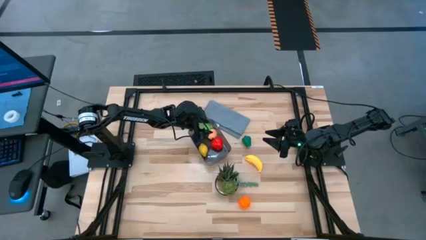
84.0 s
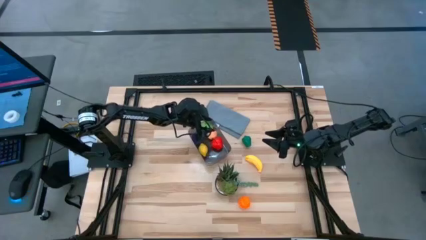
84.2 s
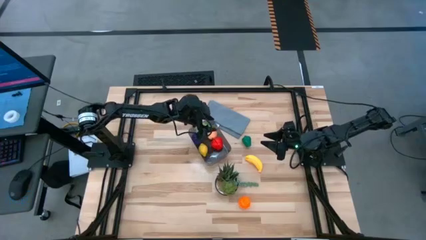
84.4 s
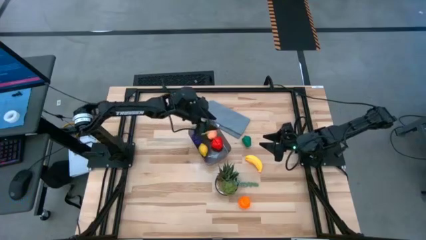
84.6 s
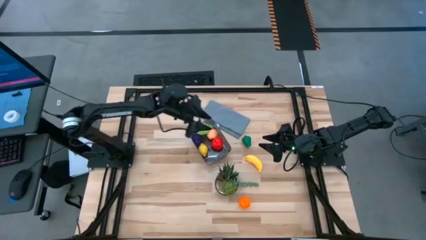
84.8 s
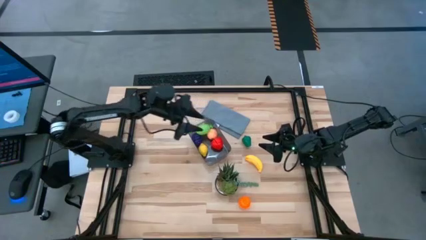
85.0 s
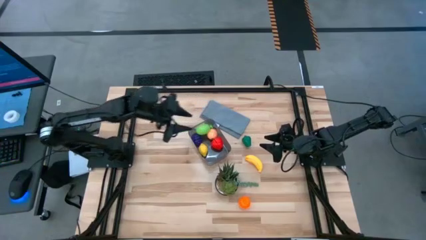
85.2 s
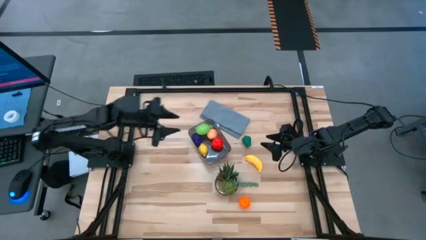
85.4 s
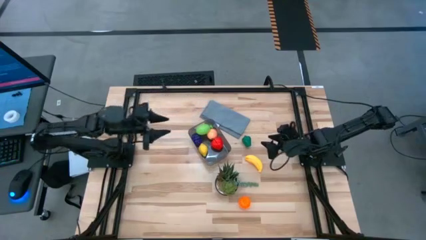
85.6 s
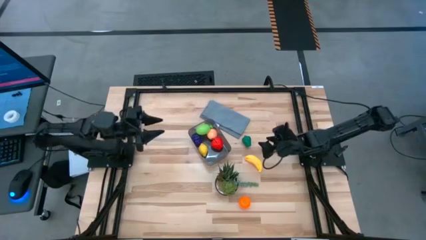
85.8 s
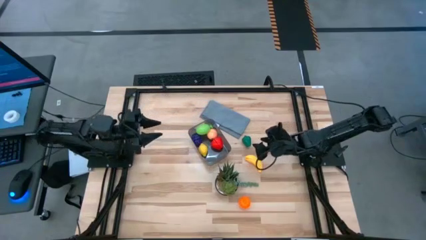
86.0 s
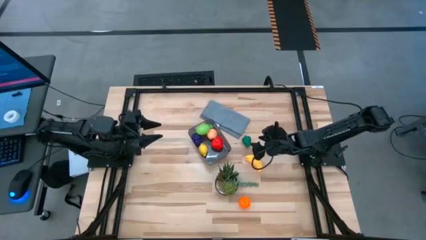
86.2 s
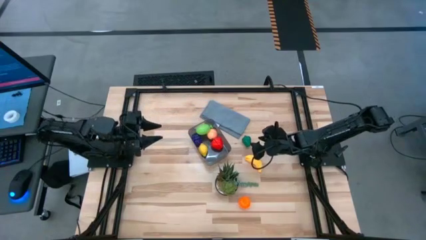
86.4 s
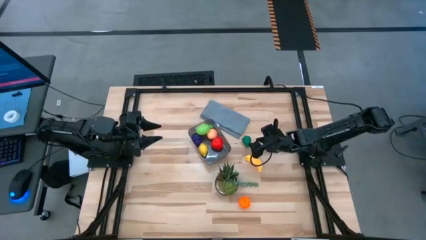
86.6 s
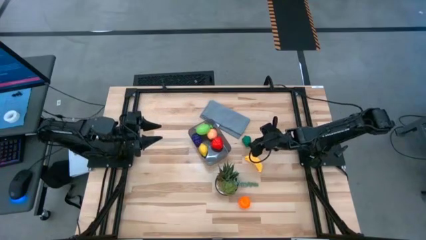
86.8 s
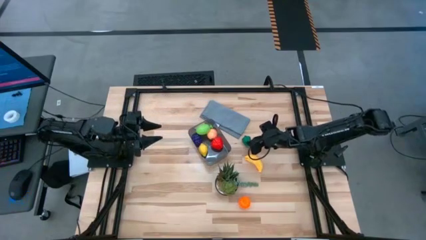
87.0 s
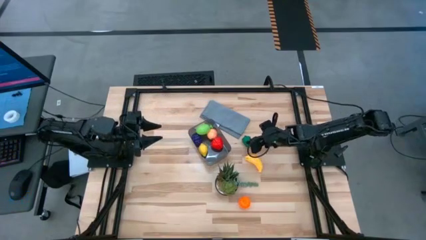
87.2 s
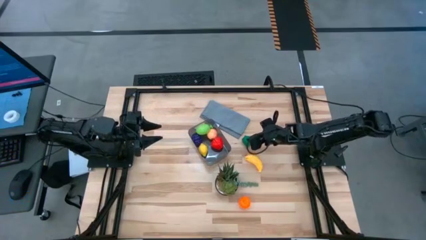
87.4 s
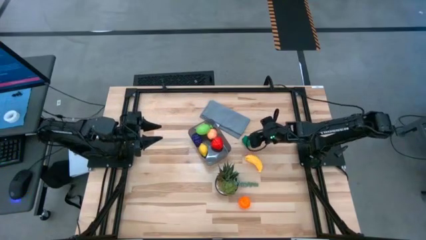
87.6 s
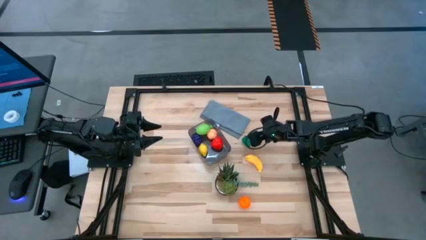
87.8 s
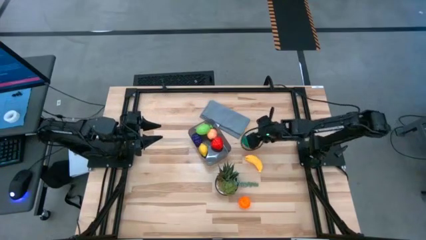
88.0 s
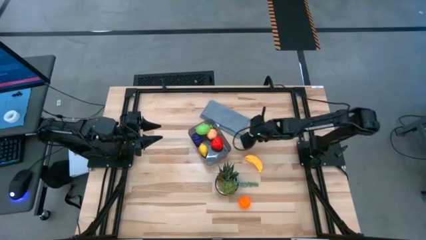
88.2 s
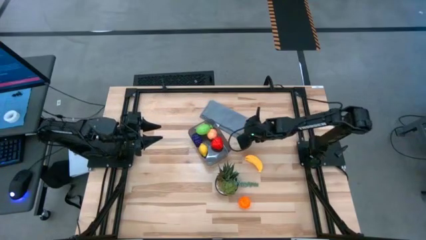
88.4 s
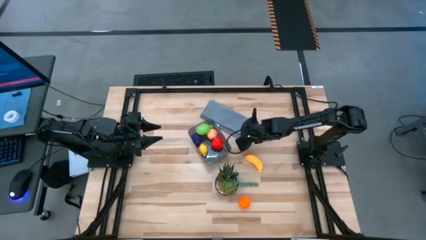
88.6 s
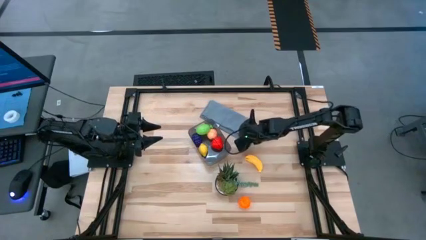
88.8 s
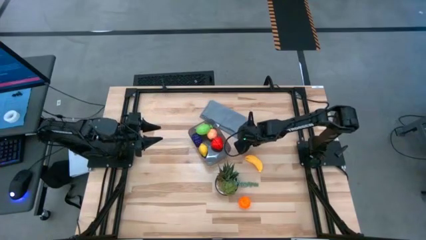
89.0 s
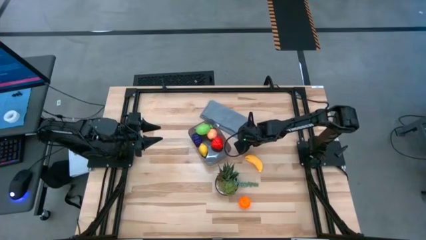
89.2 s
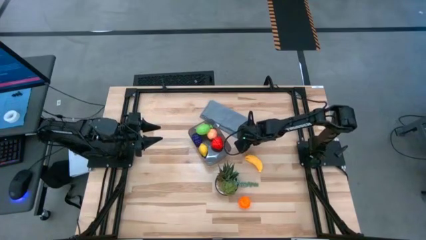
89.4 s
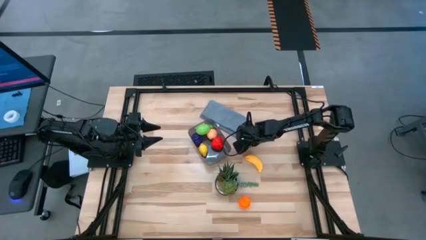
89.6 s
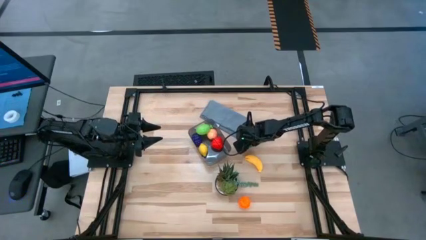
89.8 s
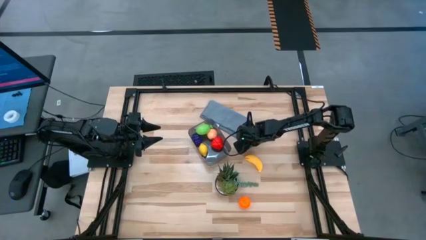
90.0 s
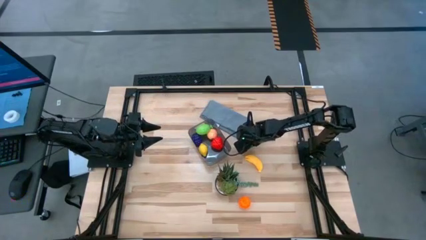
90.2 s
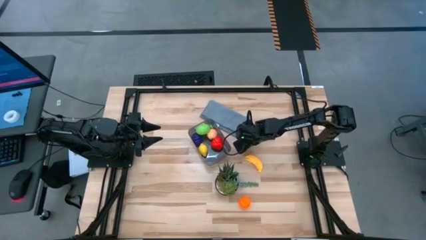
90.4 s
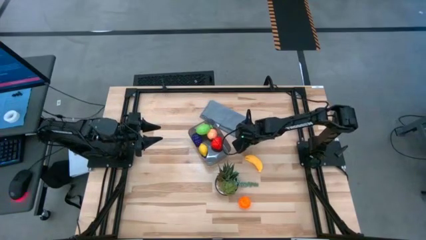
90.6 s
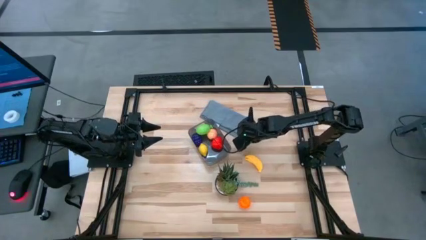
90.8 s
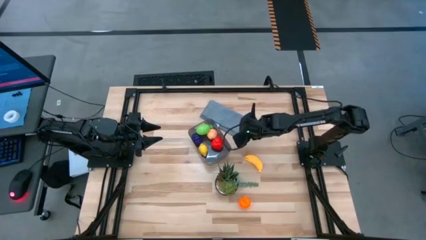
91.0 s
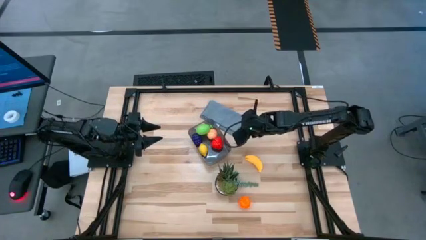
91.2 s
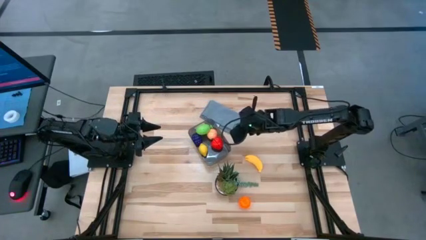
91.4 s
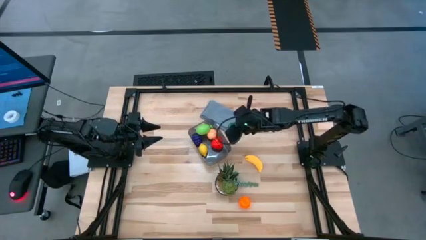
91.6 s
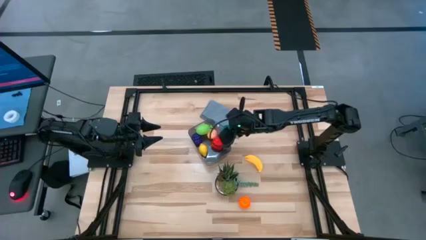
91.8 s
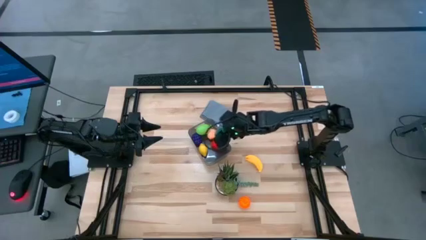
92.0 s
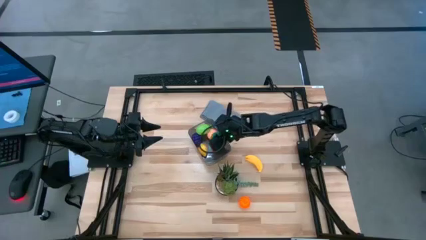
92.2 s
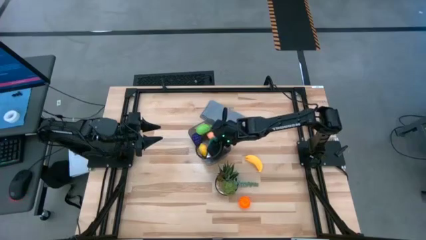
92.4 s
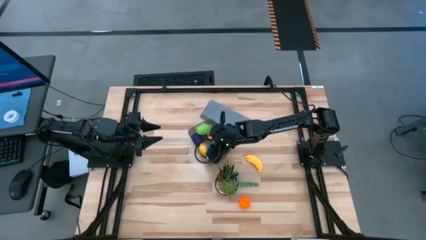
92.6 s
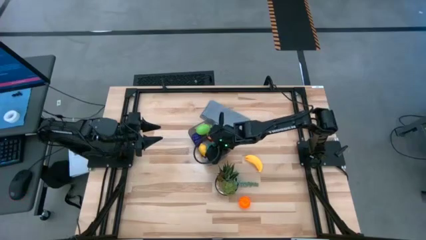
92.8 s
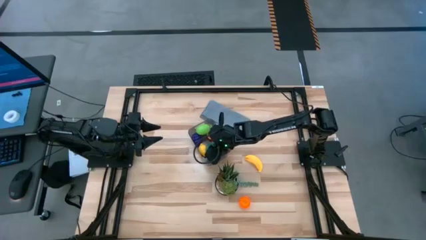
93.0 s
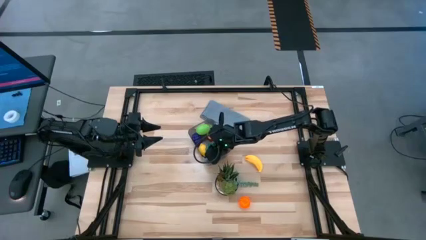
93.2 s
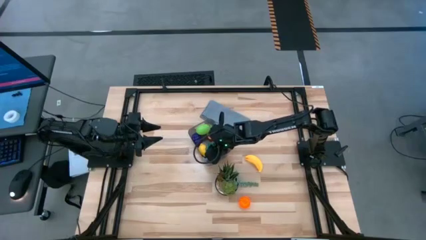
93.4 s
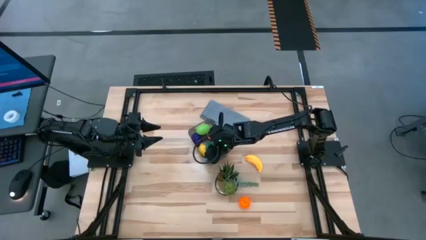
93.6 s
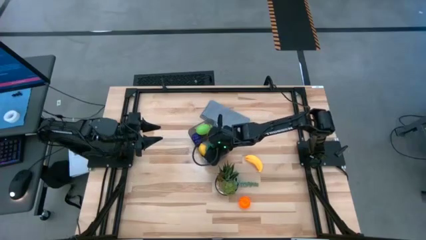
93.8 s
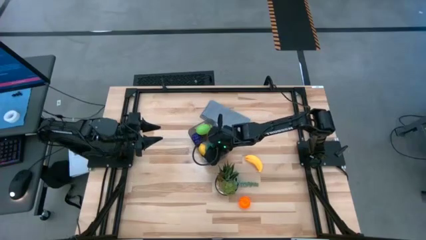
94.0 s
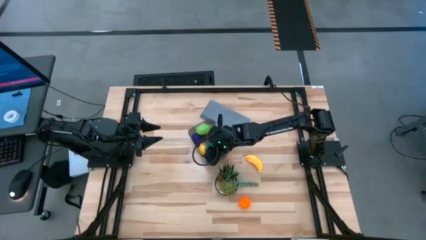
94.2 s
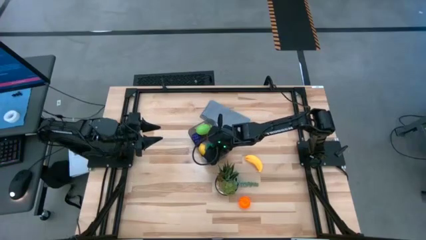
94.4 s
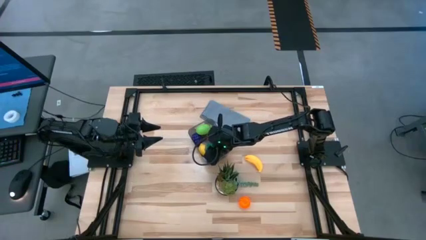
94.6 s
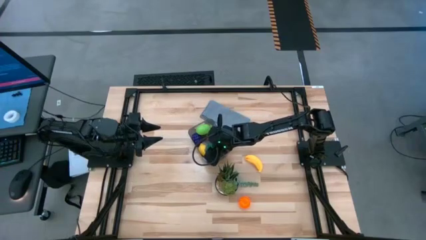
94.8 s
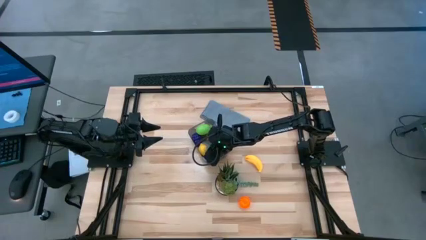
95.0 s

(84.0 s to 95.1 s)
Task: Pick and placing Produce into tupperware
Put the green bell pepper into the black bin

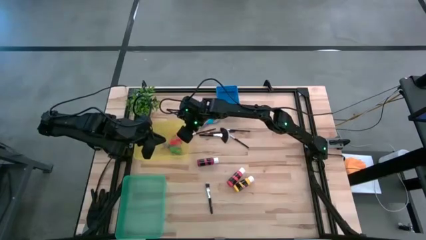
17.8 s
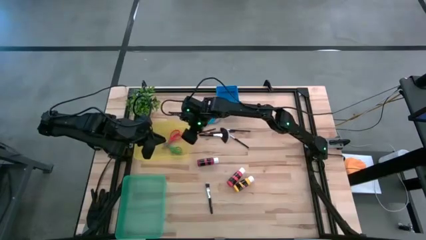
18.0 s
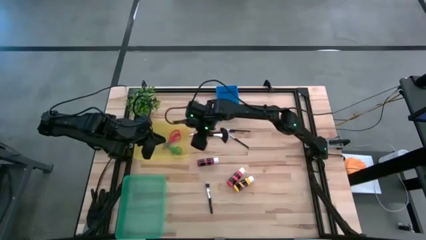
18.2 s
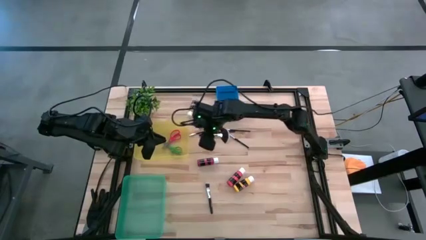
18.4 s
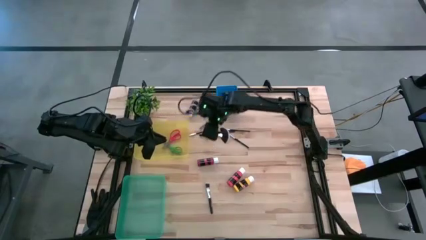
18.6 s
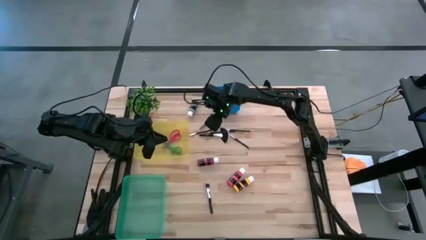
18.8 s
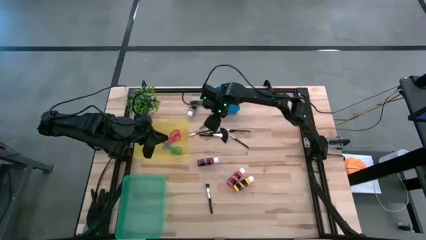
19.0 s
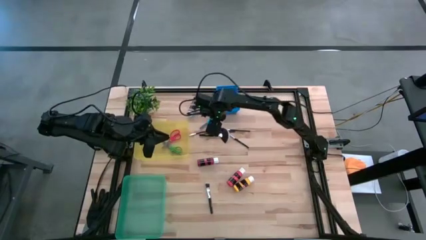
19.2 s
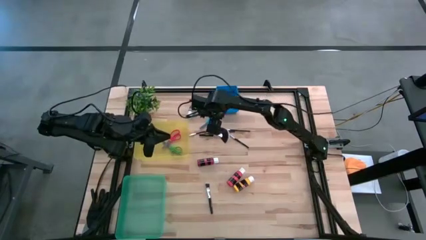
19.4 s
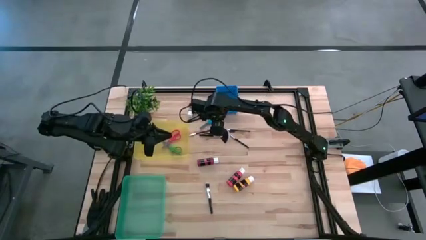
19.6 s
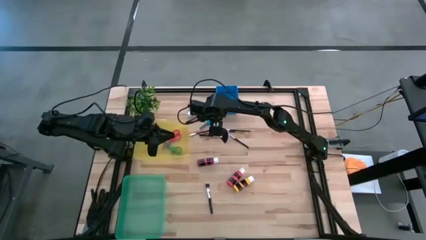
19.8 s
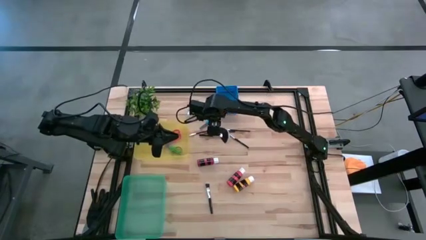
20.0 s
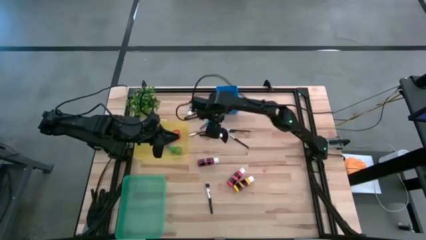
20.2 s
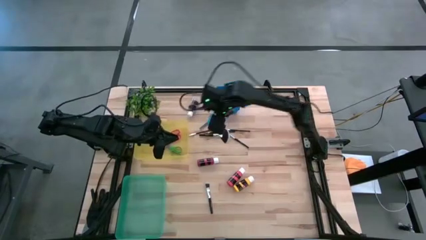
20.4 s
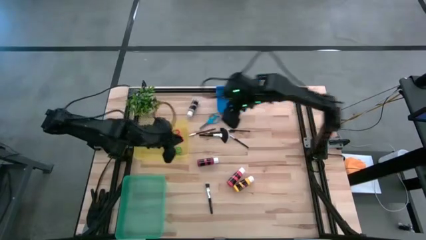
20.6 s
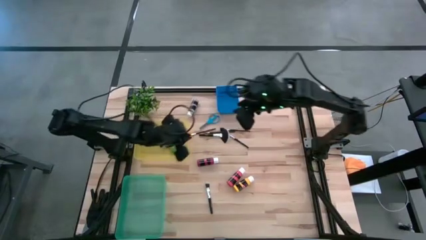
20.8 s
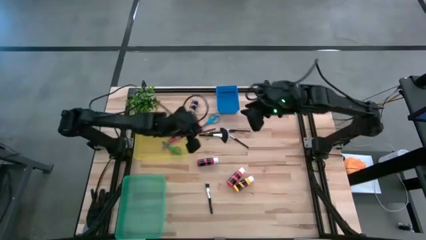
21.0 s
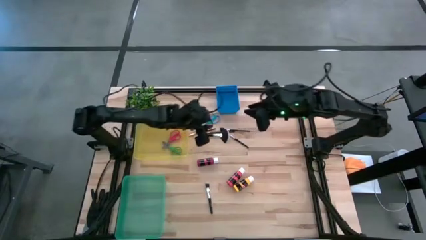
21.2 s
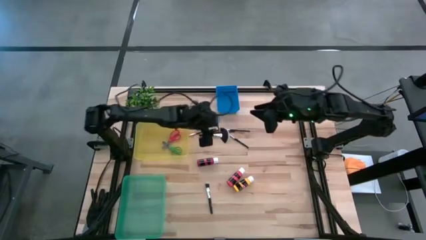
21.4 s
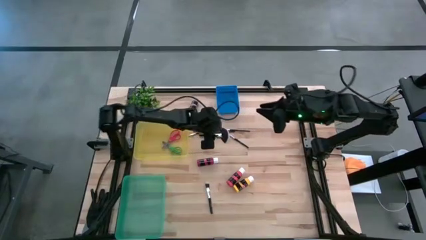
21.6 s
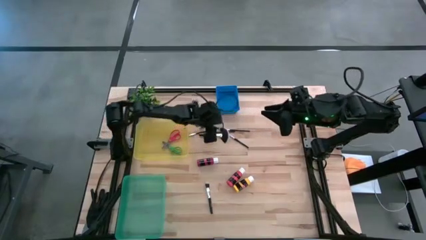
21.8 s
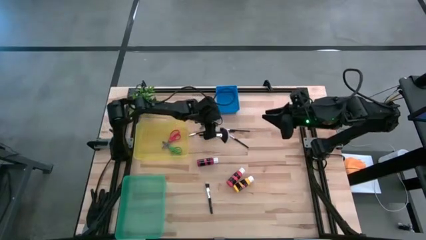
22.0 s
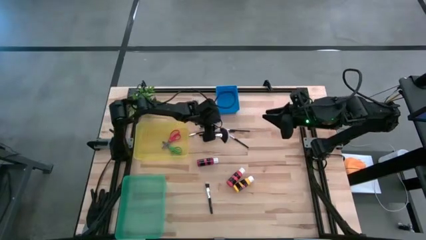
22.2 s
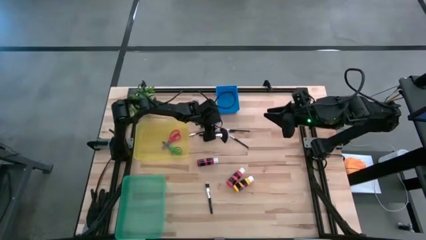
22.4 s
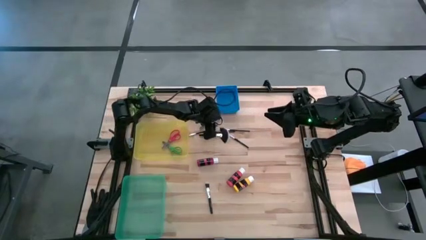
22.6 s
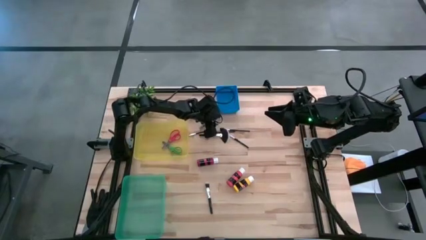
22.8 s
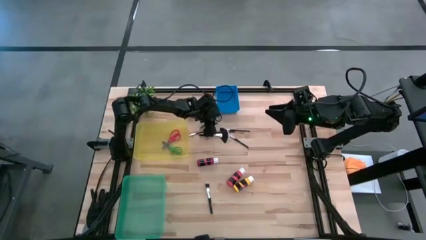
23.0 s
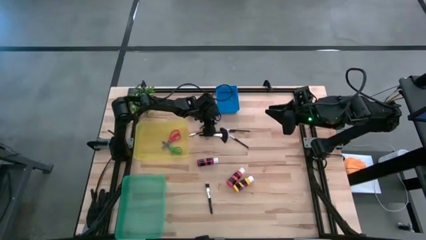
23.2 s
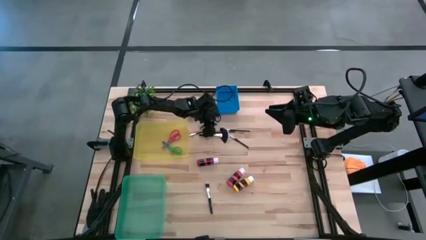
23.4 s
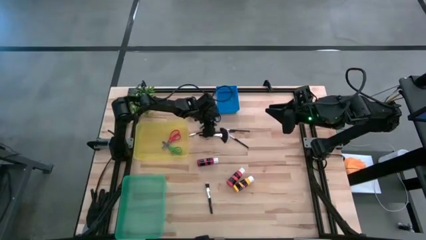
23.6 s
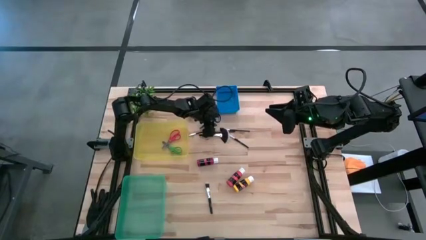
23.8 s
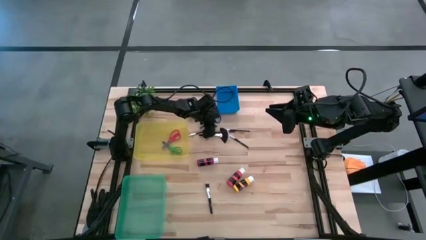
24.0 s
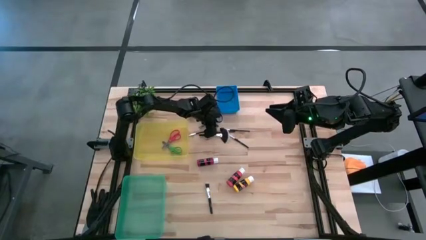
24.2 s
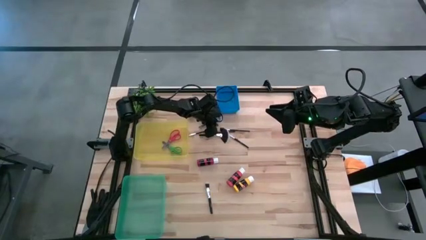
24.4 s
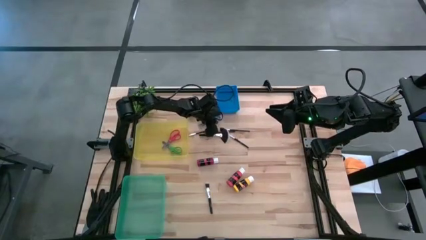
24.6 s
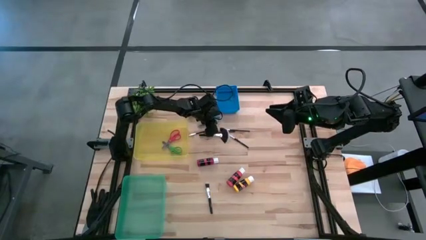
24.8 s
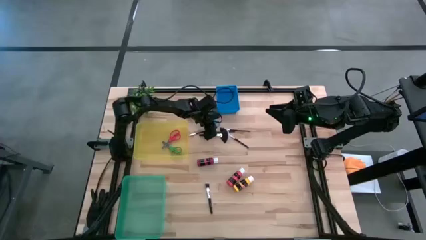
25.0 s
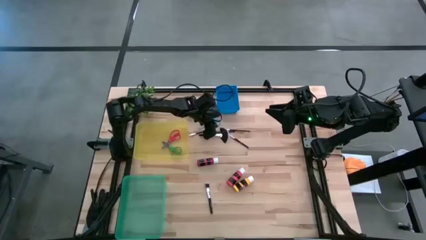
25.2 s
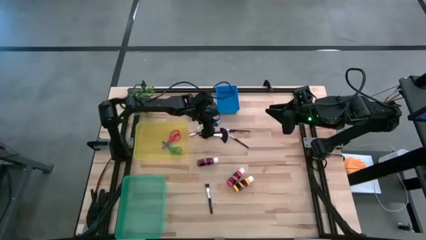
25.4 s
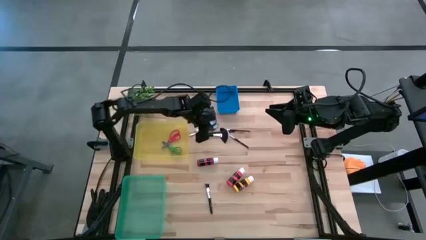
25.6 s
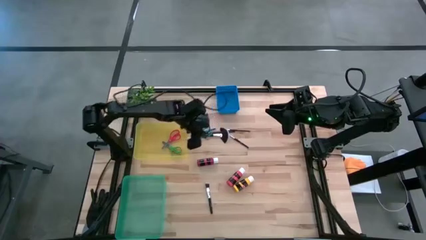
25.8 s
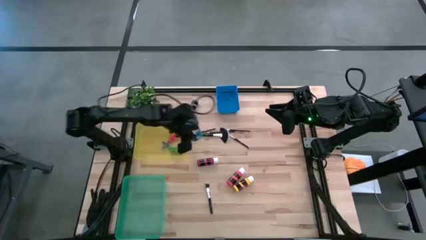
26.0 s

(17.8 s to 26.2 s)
Task: Pick & Place Paint Supplies
Put the blue scissors into the yellow bin
